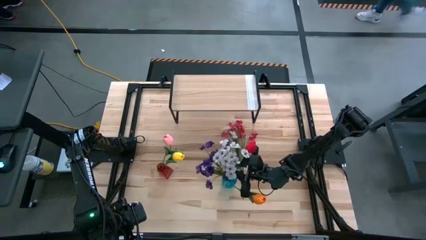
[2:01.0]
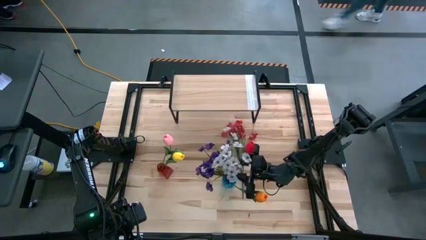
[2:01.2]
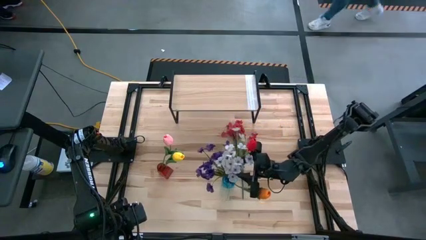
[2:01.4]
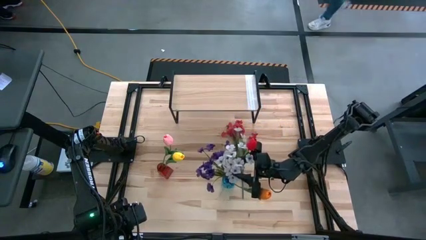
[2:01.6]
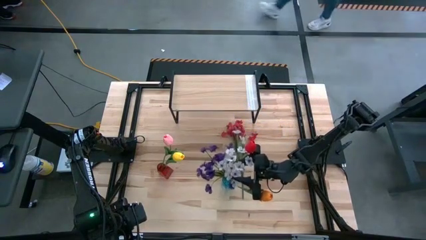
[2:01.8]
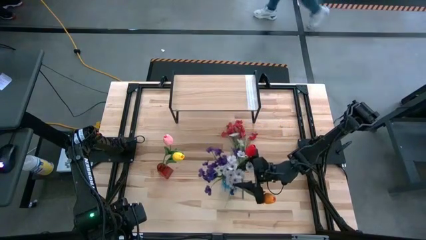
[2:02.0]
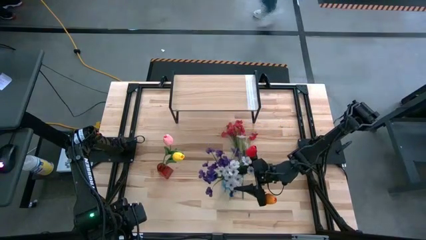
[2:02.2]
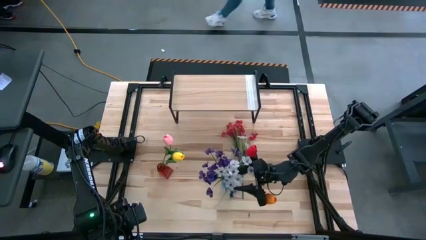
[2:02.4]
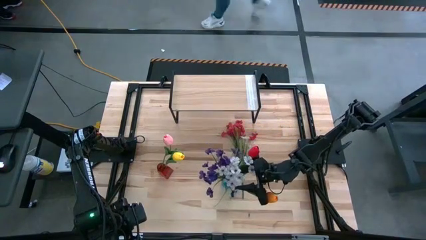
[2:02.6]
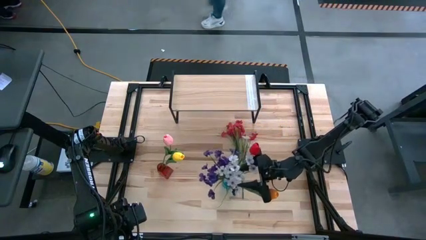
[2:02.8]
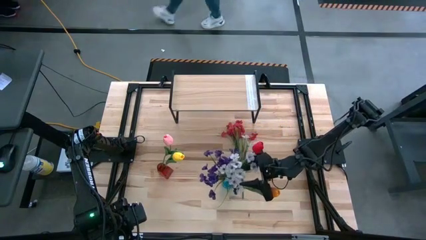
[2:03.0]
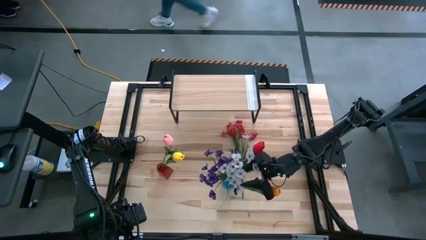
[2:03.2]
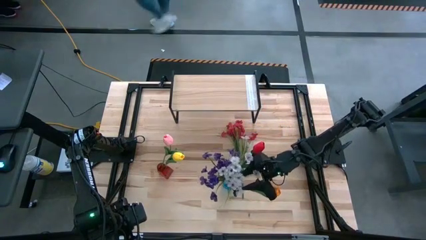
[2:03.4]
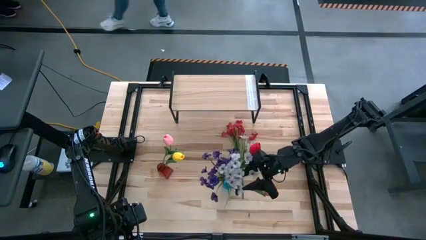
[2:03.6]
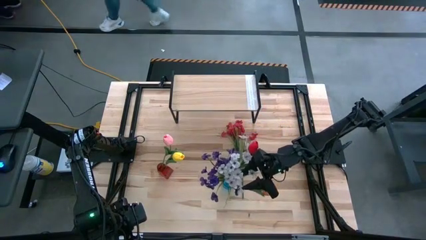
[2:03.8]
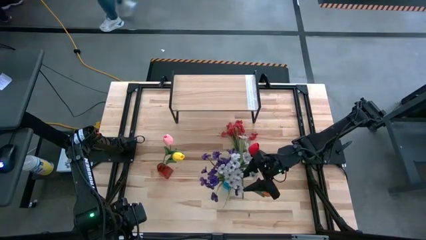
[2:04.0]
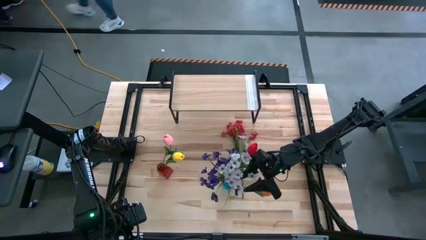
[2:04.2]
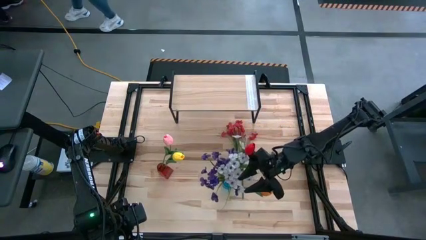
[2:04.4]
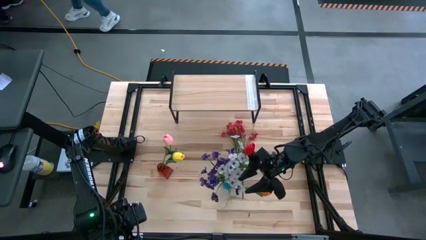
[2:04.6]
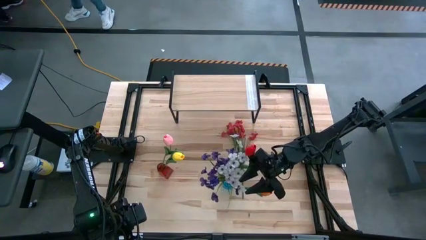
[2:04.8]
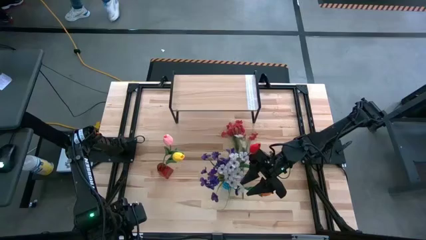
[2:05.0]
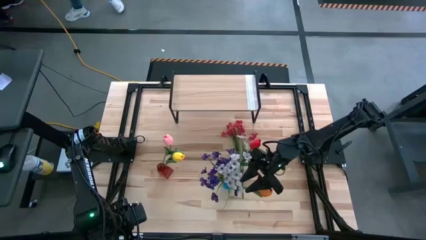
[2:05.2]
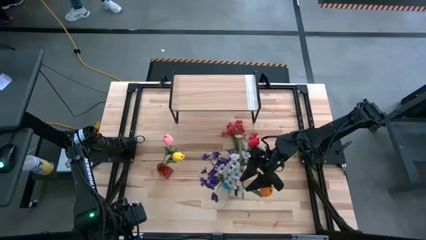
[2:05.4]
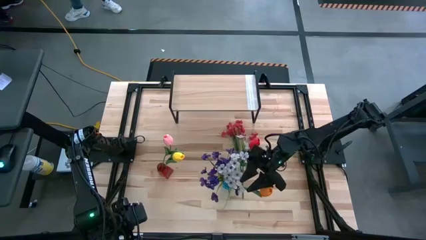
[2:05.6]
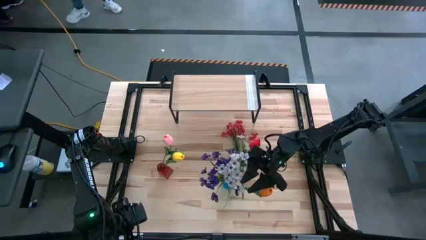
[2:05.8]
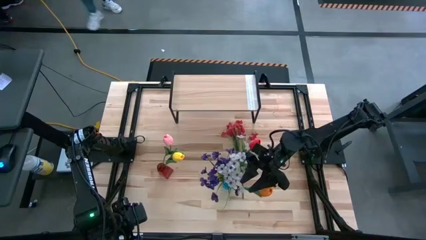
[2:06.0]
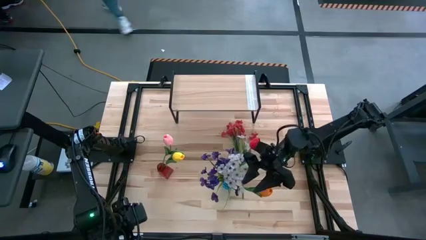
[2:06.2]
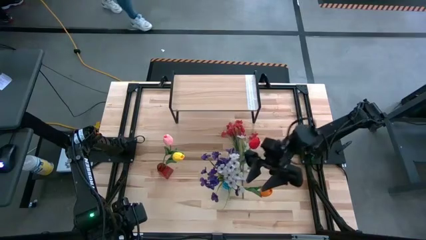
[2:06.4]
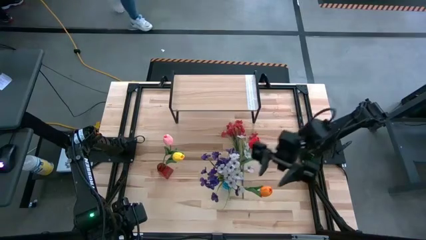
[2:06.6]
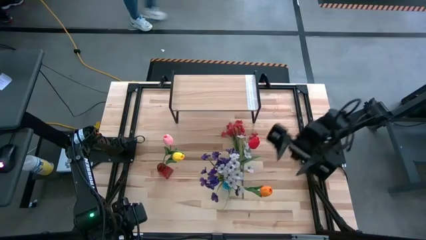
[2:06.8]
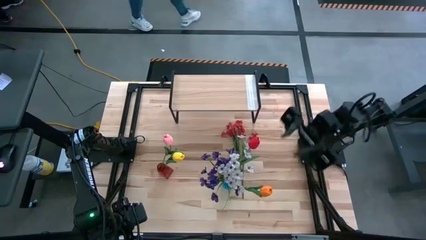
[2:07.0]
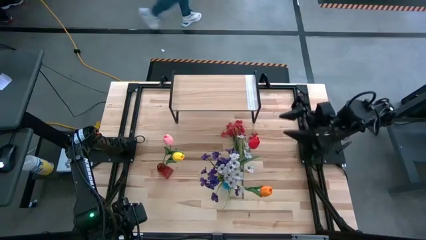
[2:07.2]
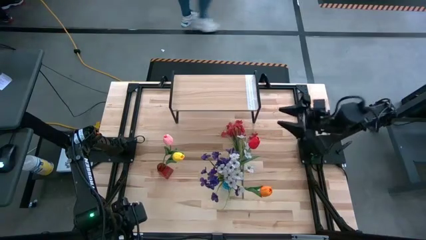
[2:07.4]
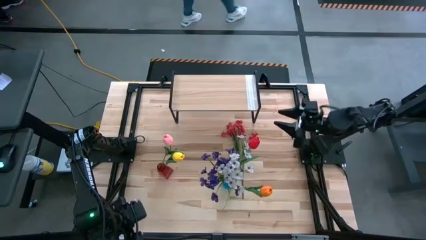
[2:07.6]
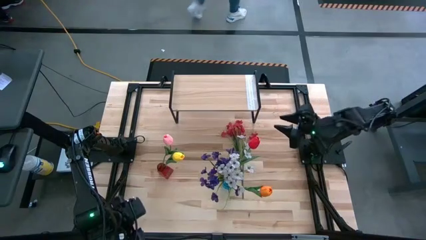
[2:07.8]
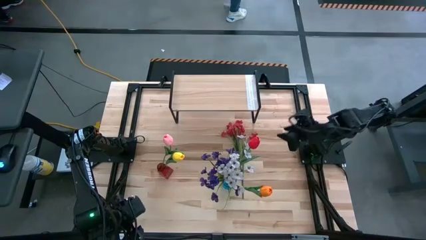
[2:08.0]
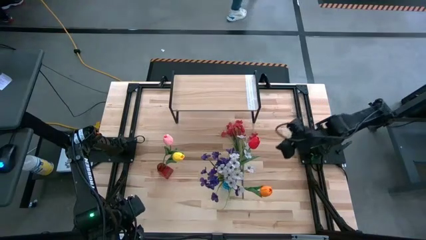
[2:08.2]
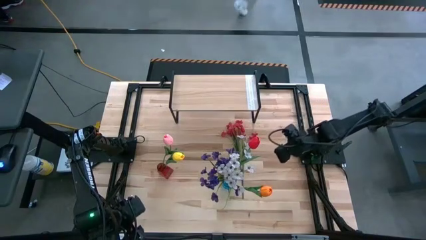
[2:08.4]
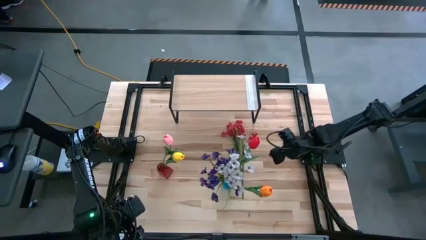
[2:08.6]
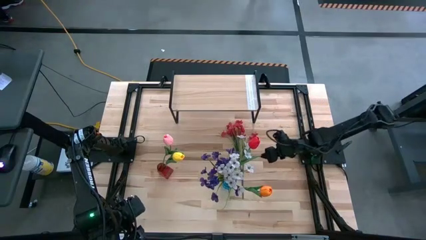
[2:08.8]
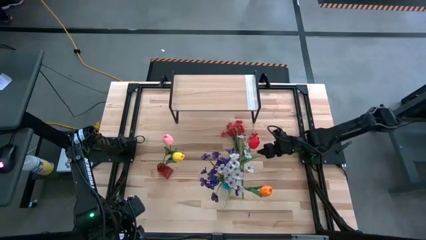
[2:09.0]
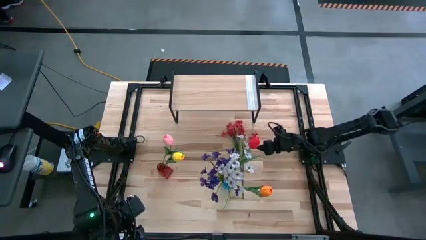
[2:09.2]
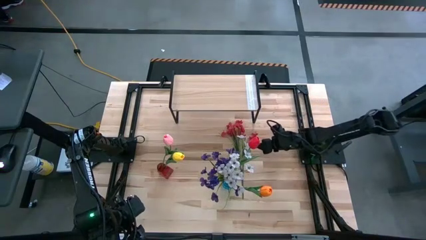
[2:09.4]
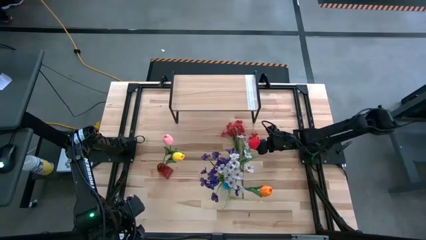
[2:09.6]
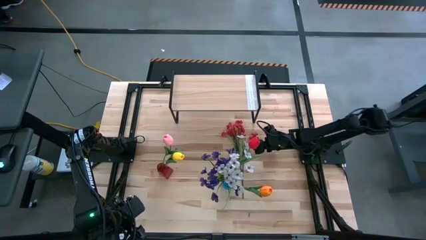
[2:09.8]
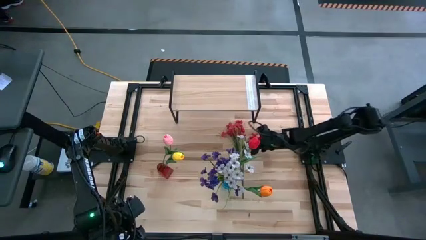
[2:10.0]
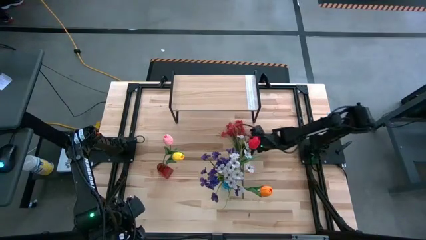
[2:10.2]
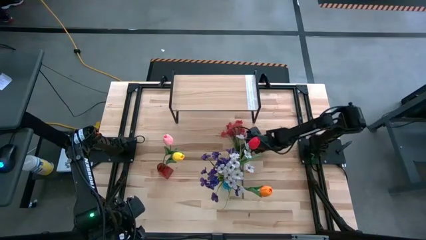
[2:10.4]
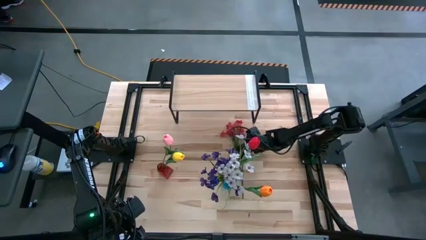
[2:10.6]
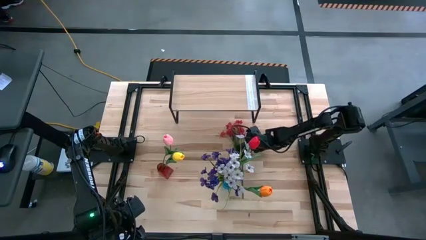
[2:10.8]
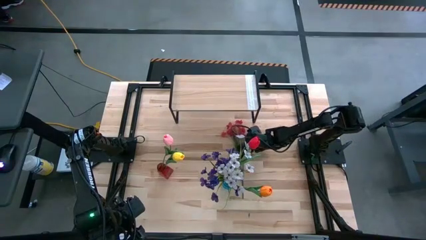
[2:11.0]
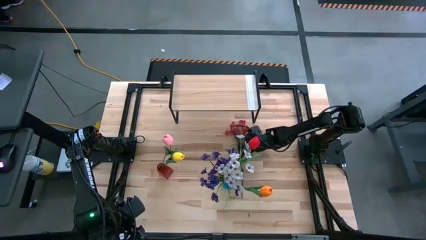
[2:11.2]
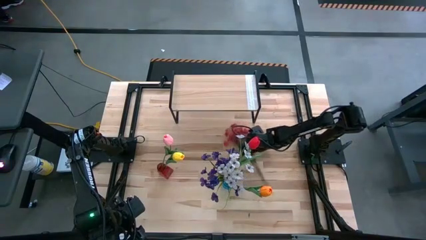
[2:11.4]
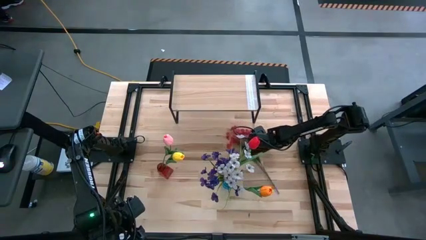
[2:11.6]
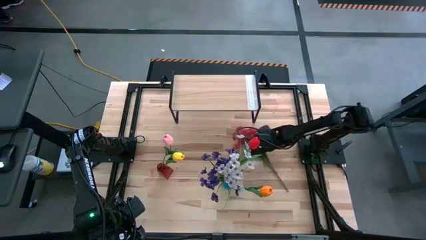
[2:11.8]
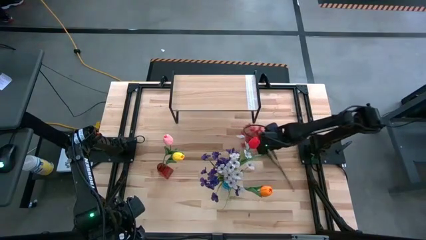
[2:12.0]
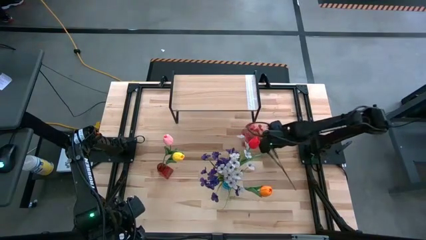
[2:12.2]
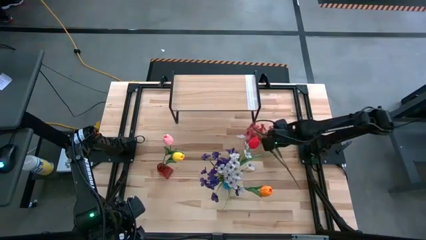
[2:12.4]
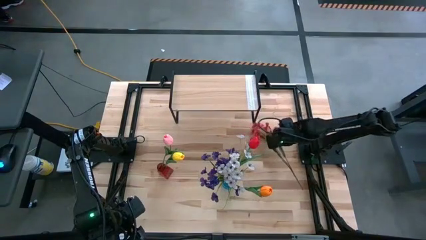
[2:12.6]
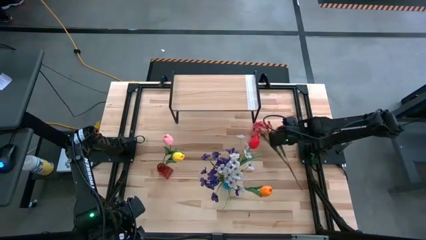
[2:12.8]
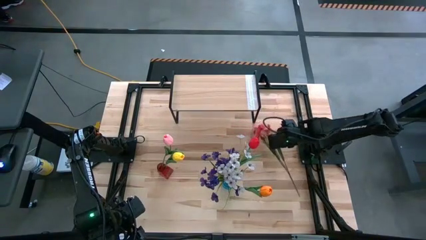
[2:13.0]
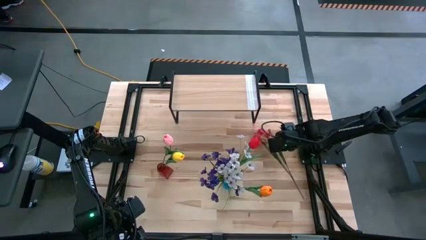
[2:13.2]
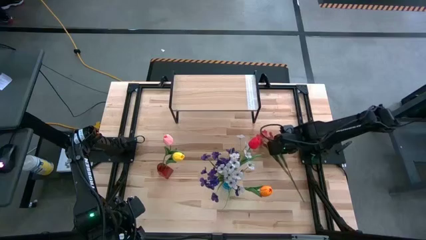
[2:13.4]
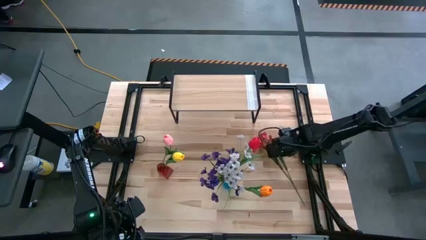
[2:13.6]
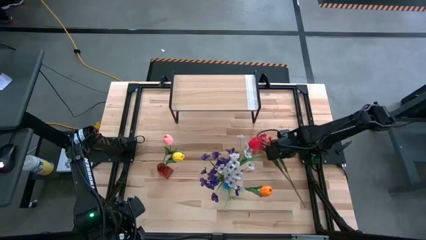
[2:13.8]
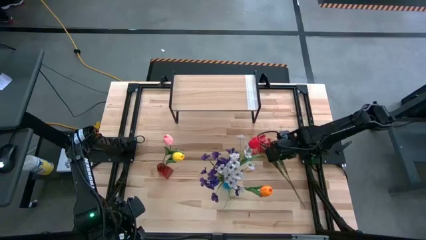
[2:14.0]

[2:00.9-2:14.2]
Task: Pick and place flowers into a vace then onto a shelf
Put the red flowers into the red vase
